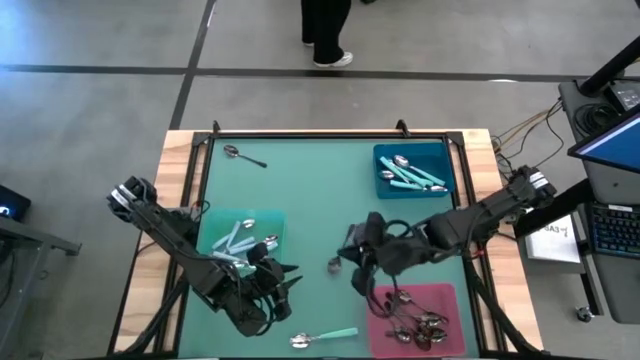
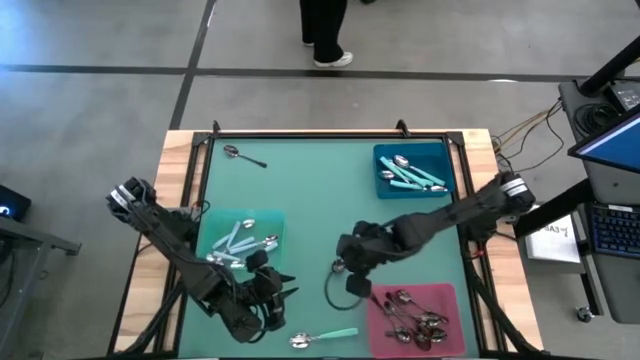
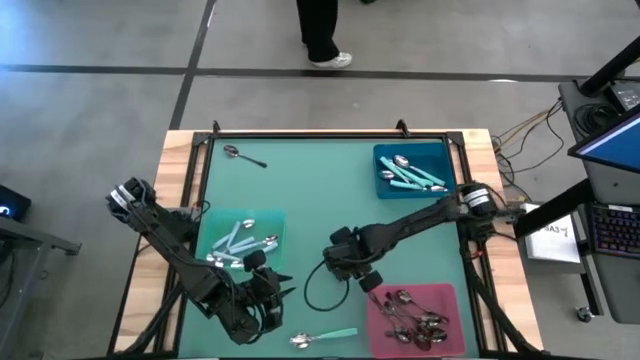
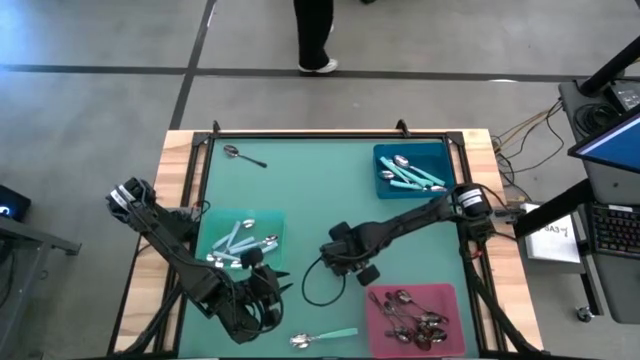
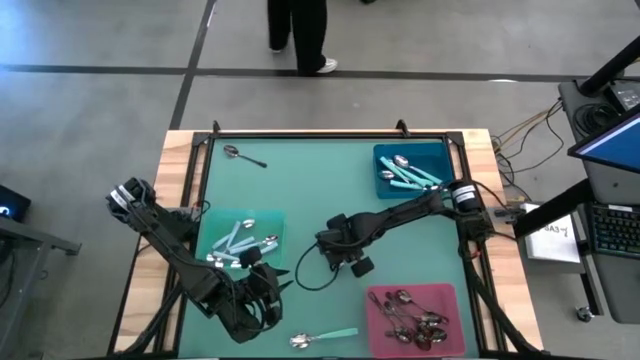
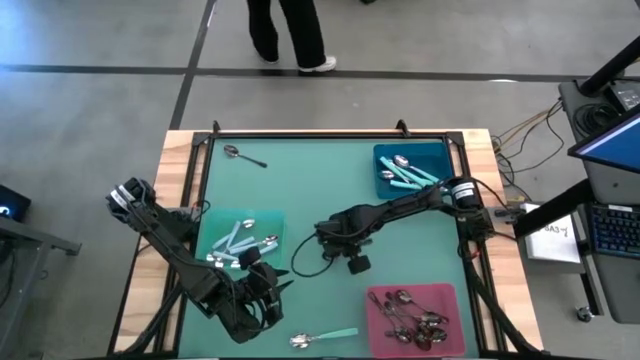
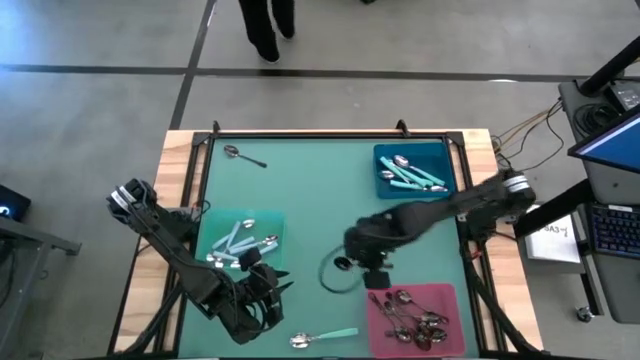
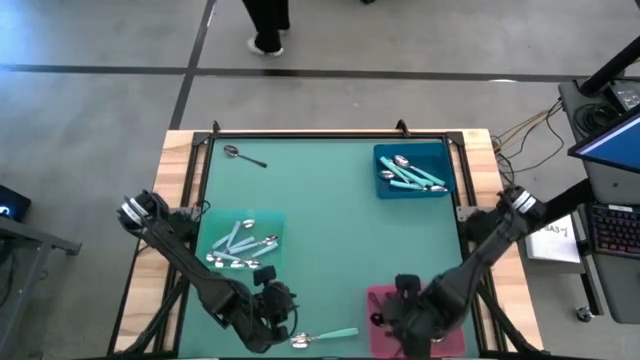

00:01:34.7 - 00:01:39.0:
Task: Sort silverware by color (type)
Put the black spoon into the red bin

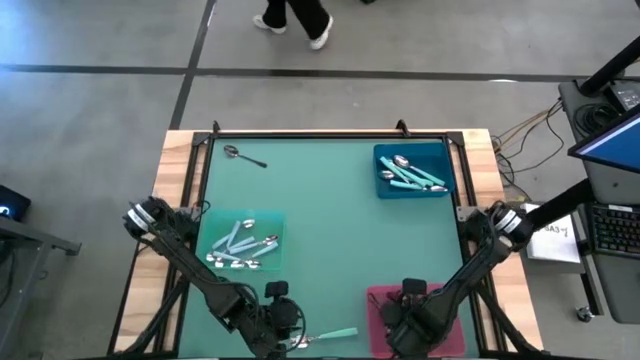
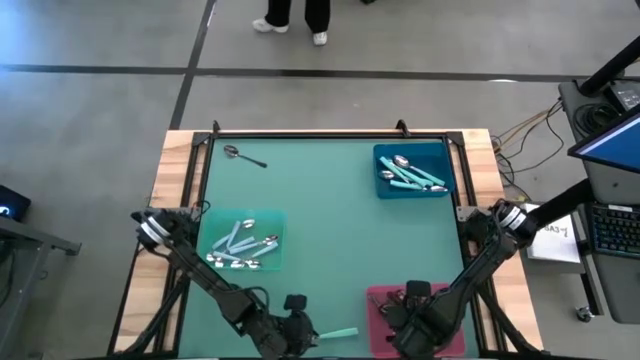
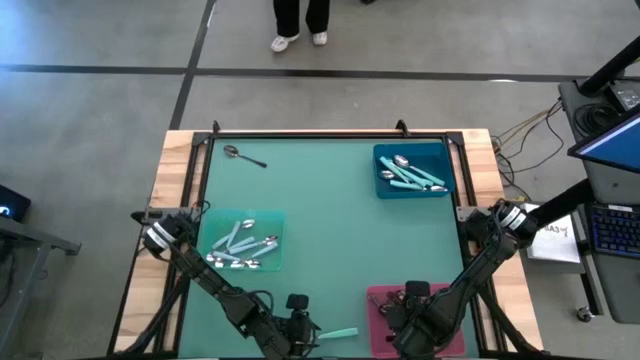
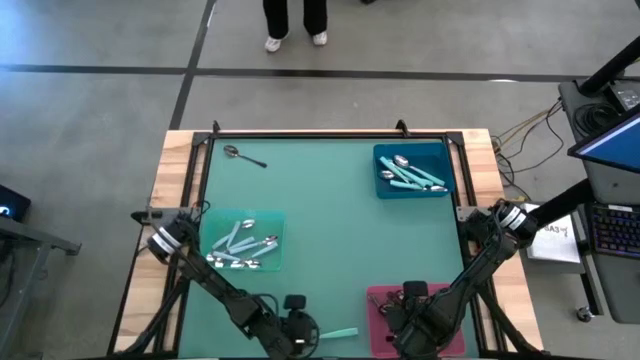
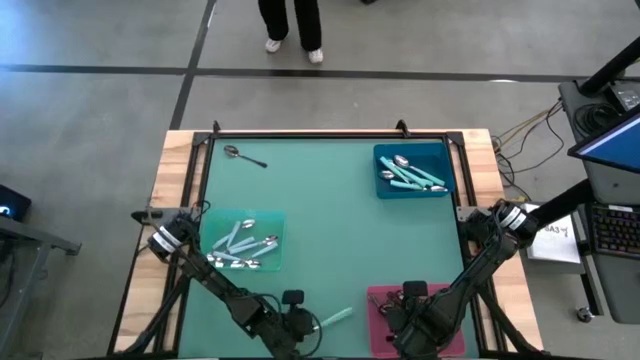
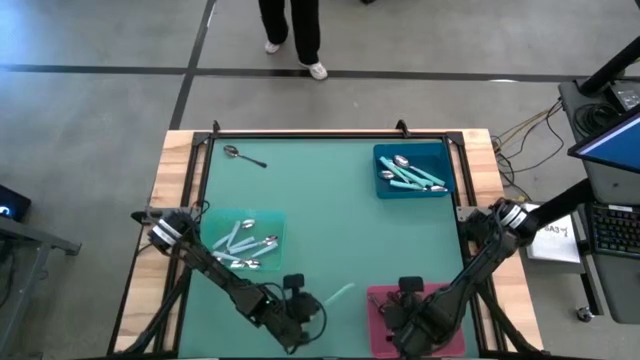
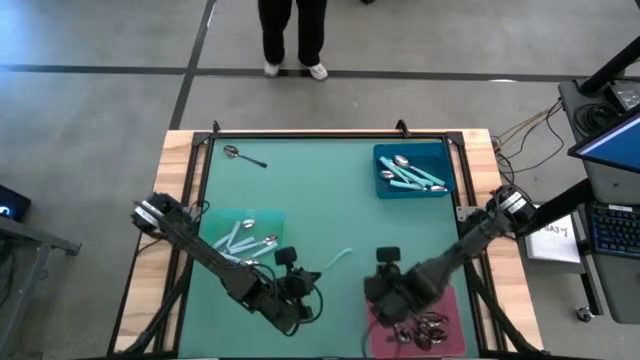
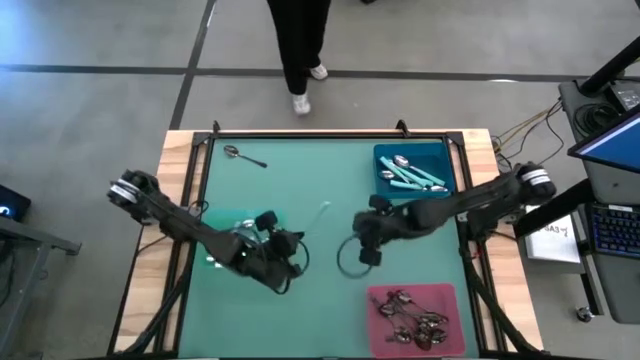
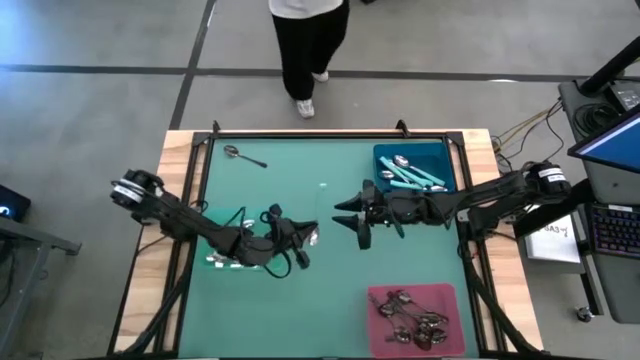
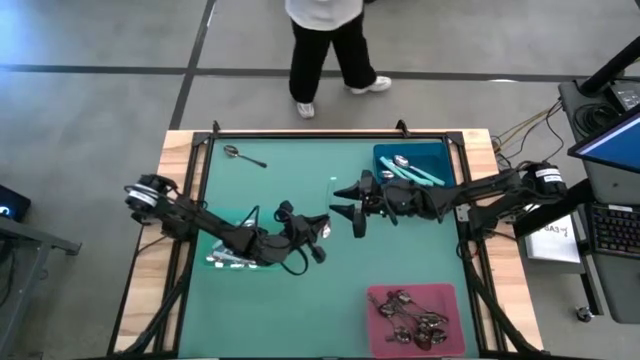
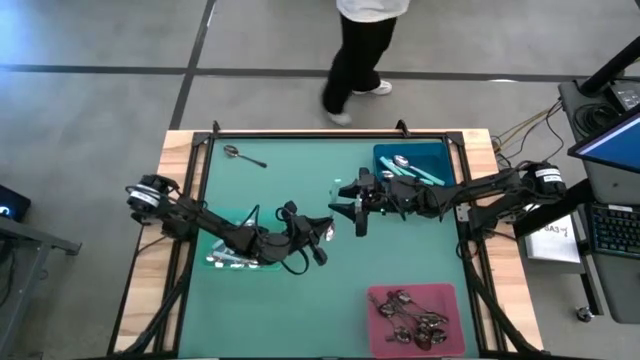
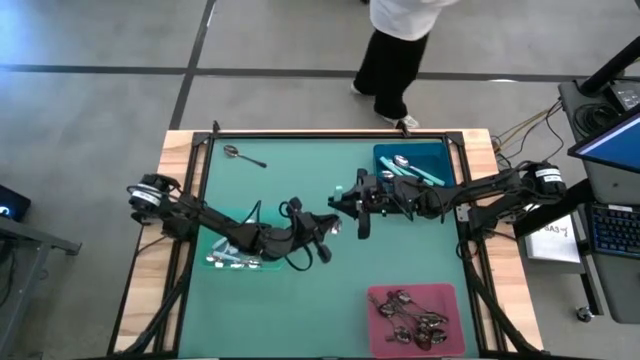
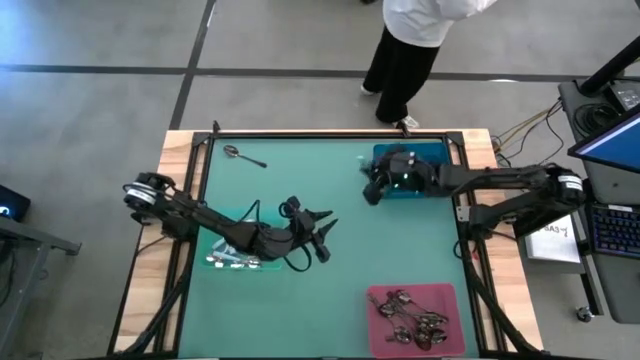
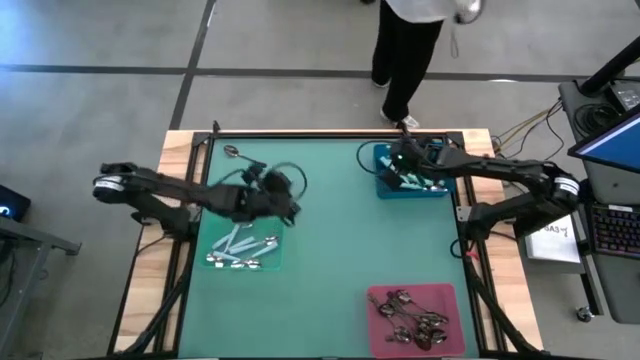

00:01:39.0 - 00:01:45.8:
Put the green spoon into the blue bin

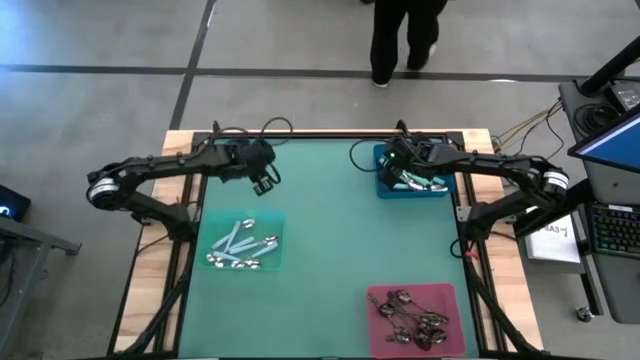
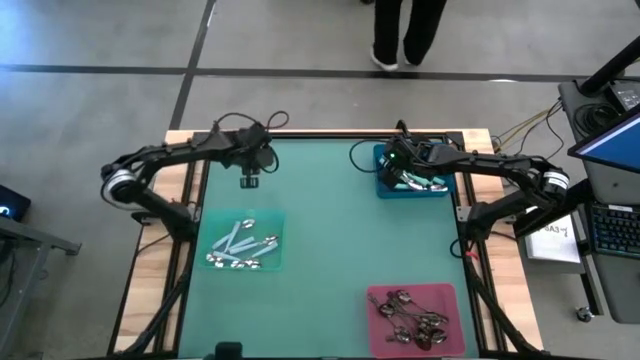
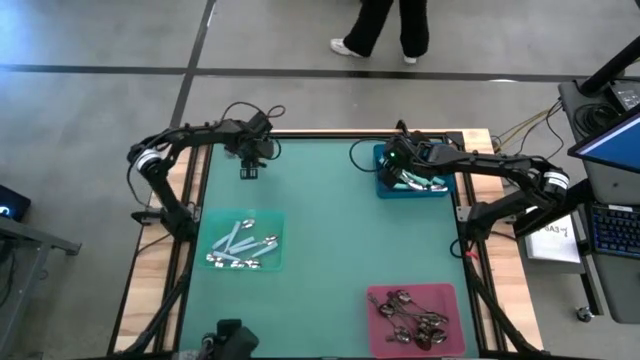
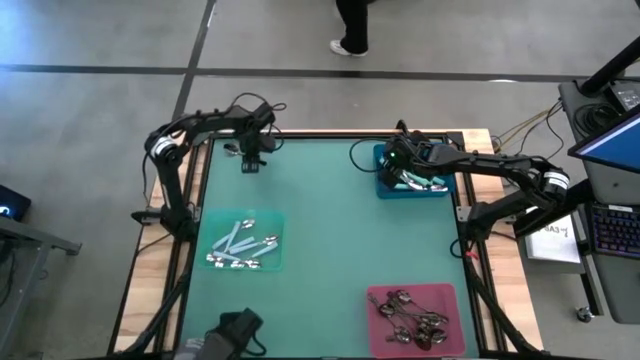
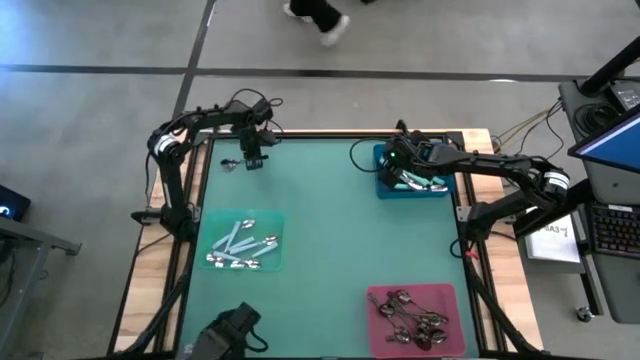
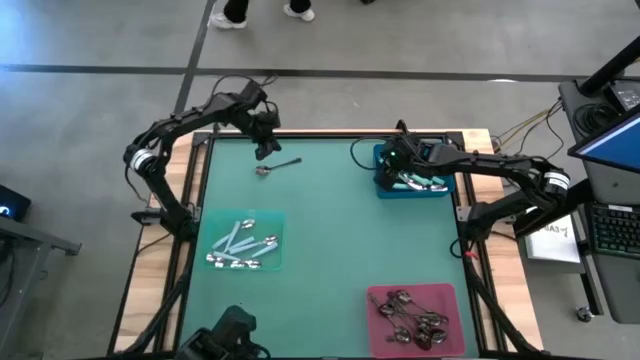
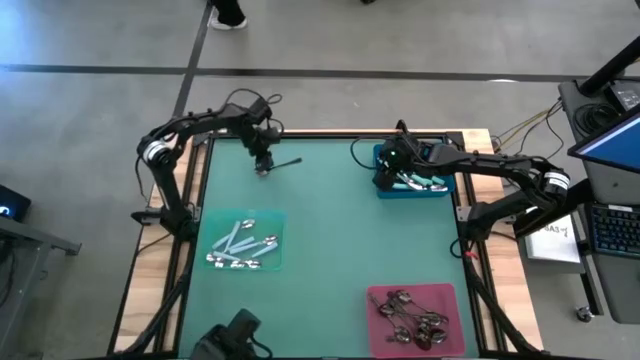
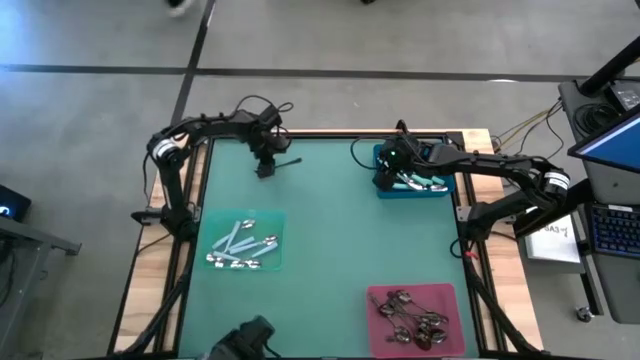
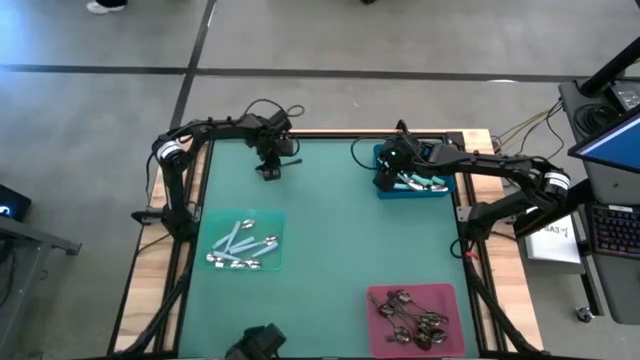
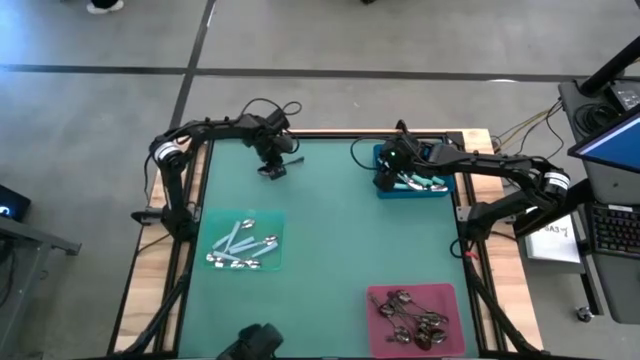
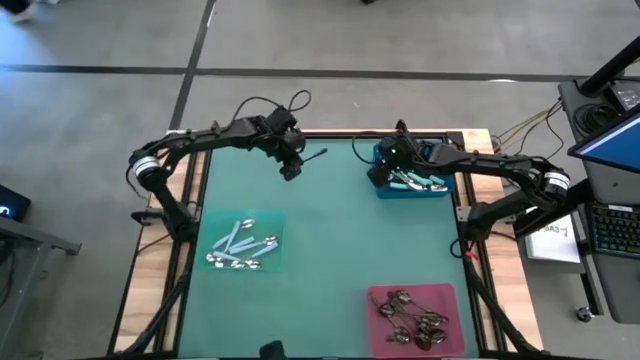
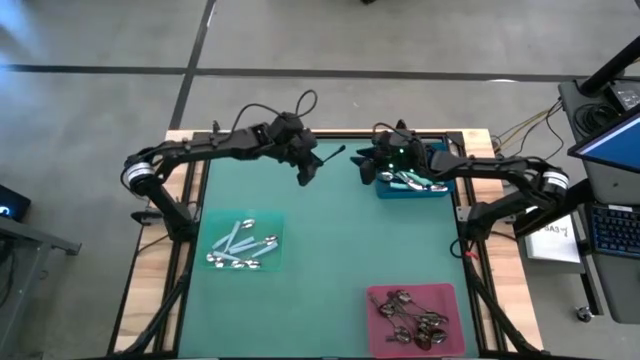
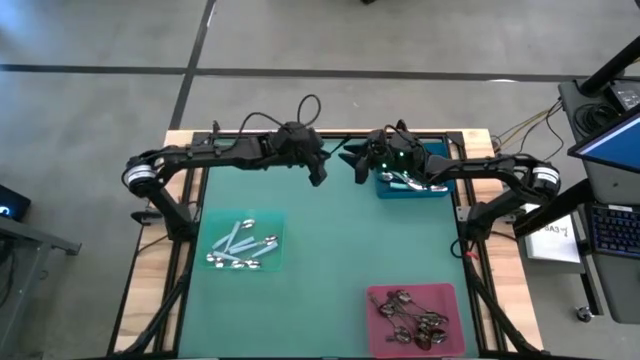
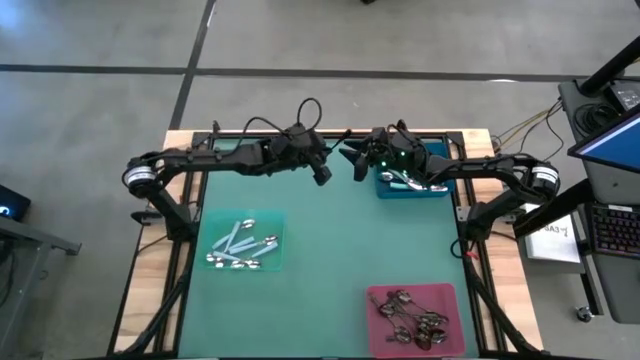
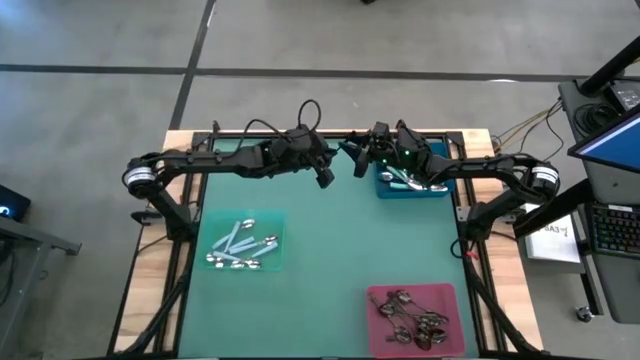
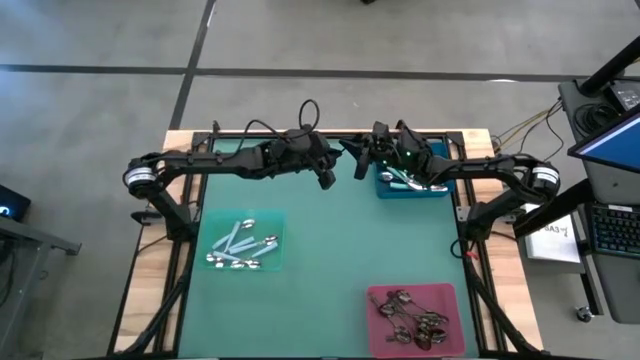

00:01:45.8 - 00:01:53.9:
Put the black spoon into the red bin

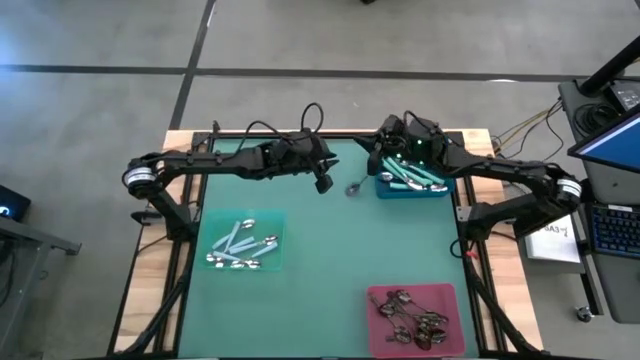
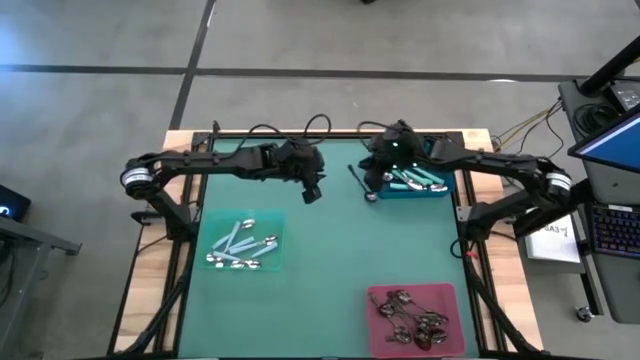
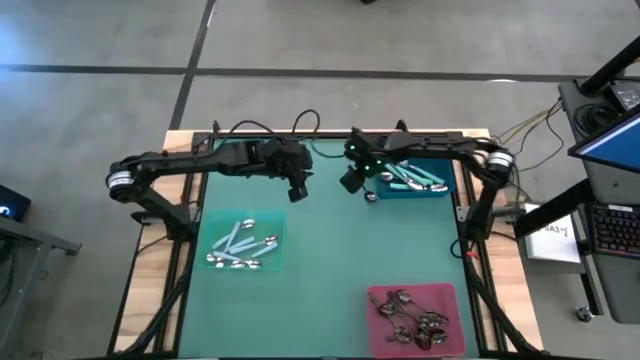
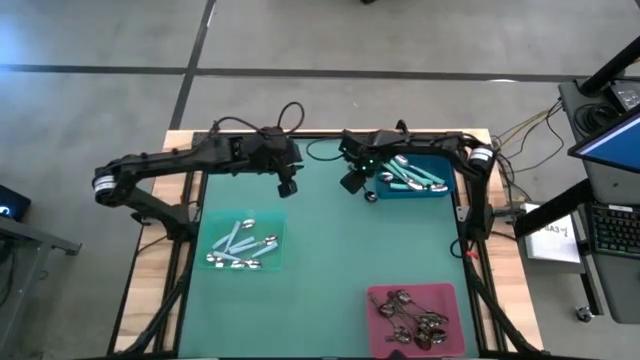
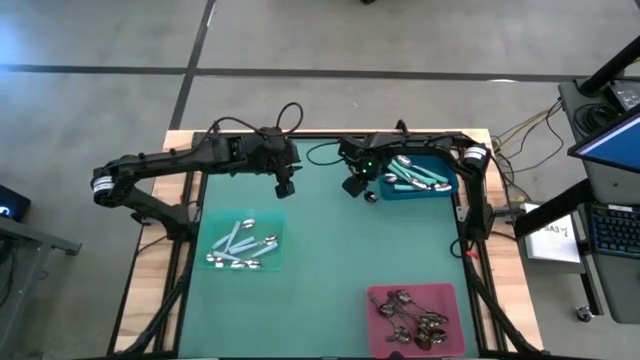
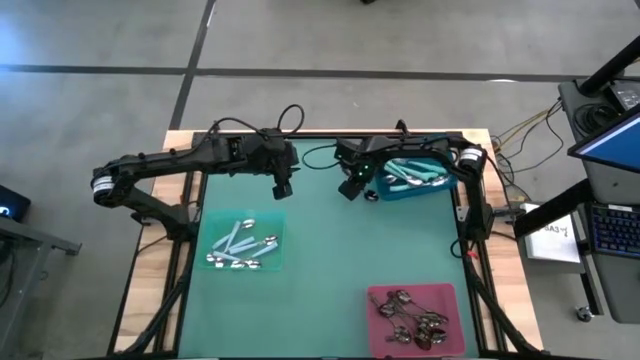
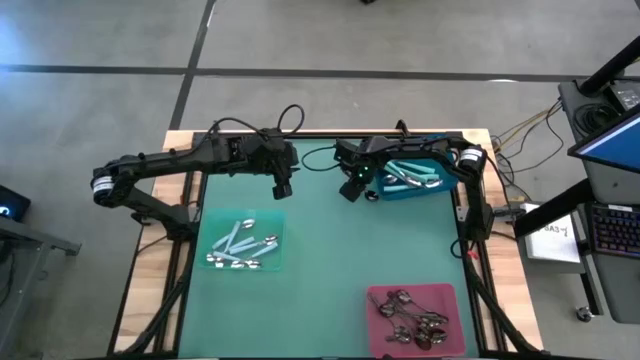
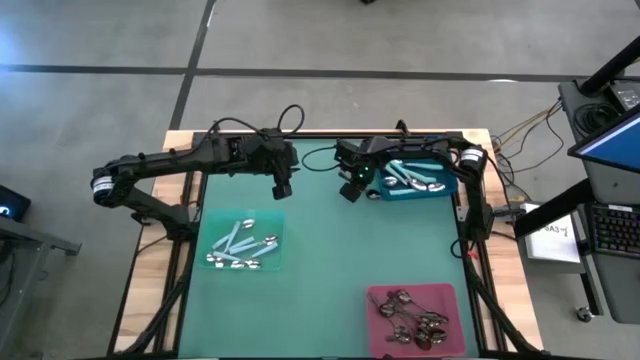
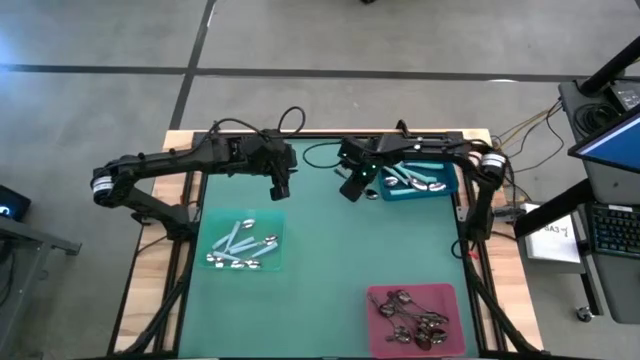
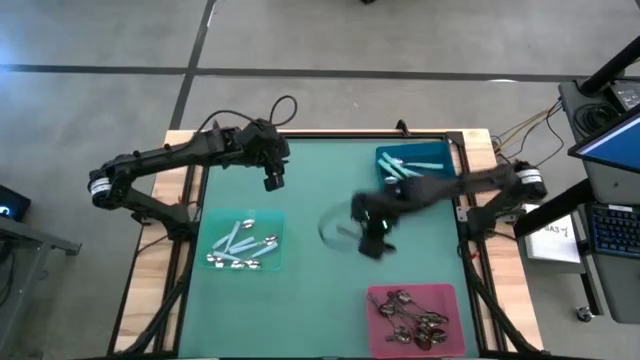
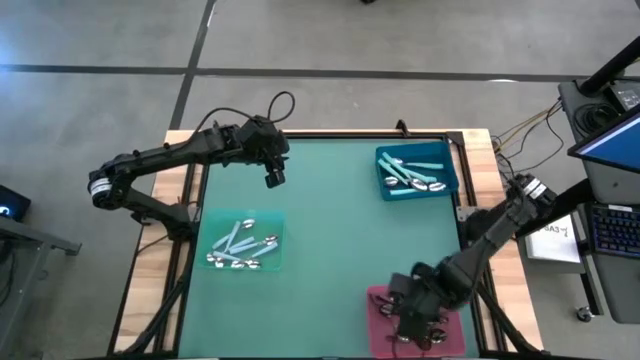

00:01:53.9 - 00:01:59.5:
Put the black spoon into the red bin
